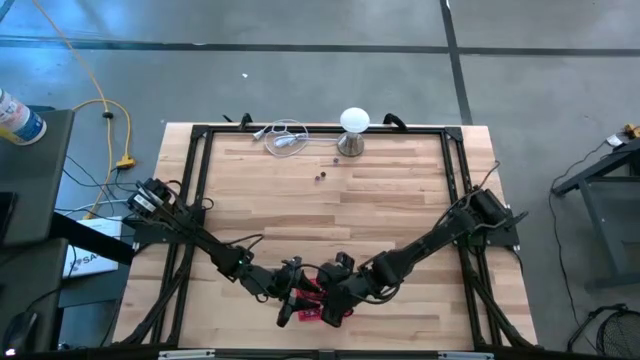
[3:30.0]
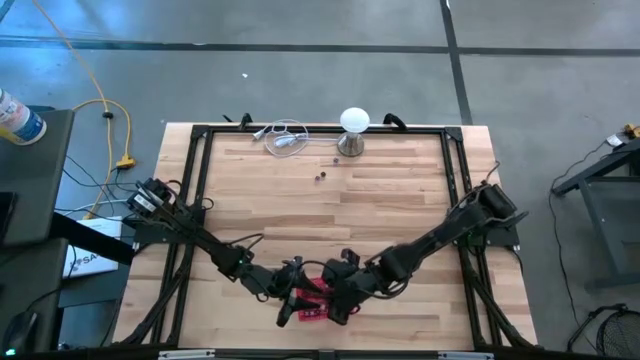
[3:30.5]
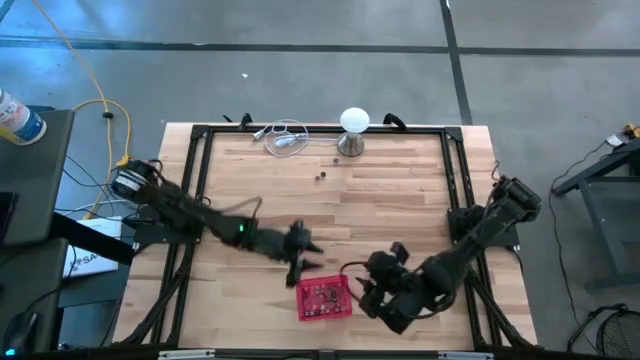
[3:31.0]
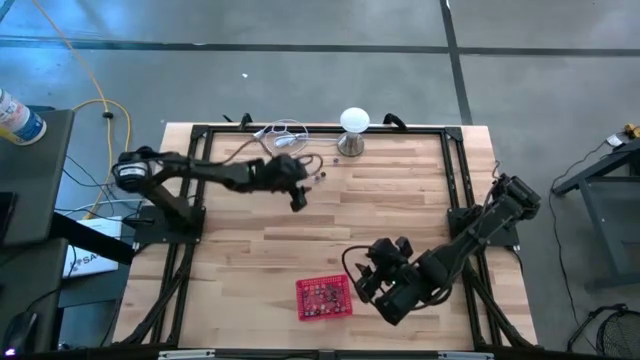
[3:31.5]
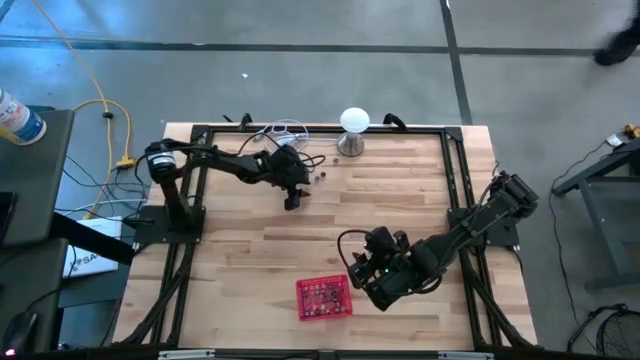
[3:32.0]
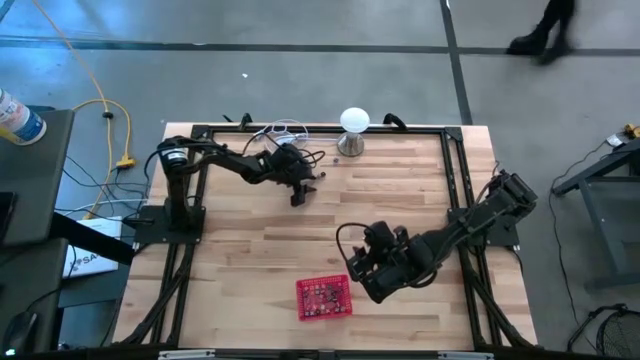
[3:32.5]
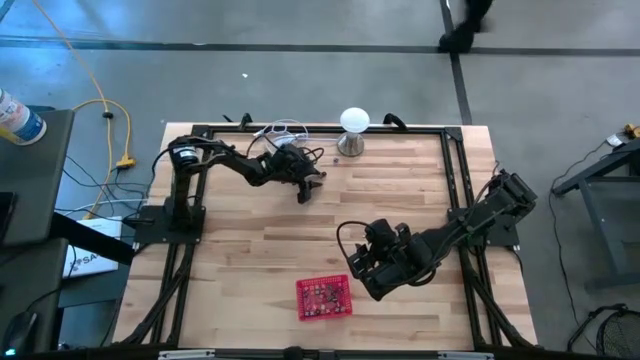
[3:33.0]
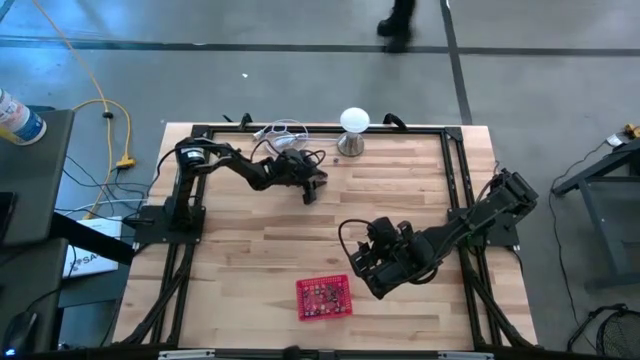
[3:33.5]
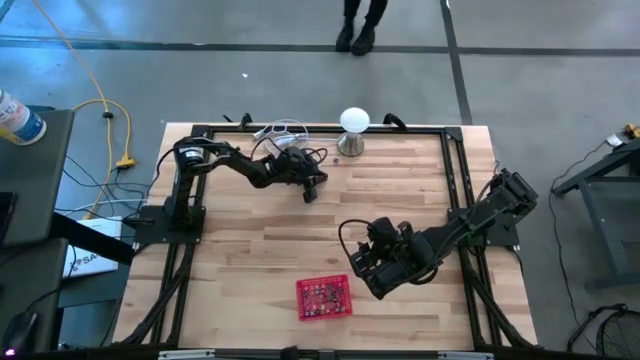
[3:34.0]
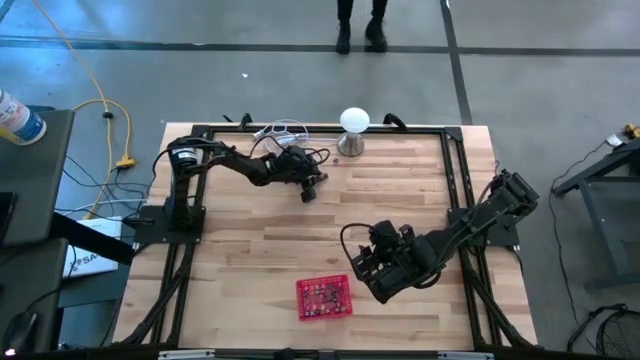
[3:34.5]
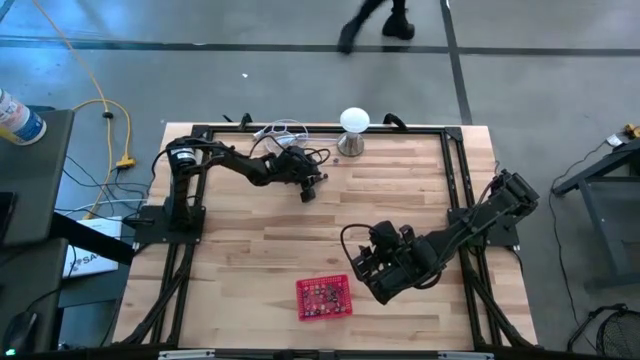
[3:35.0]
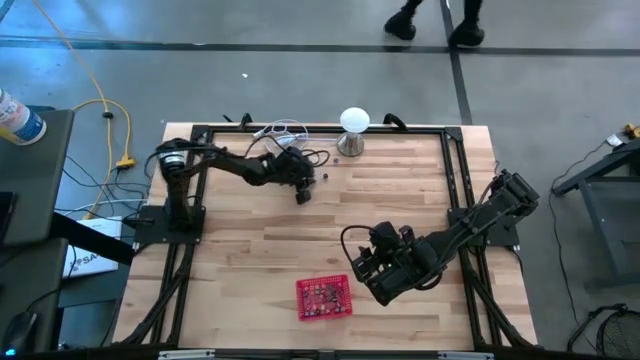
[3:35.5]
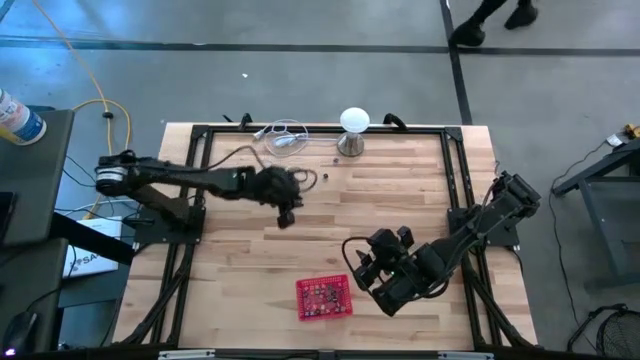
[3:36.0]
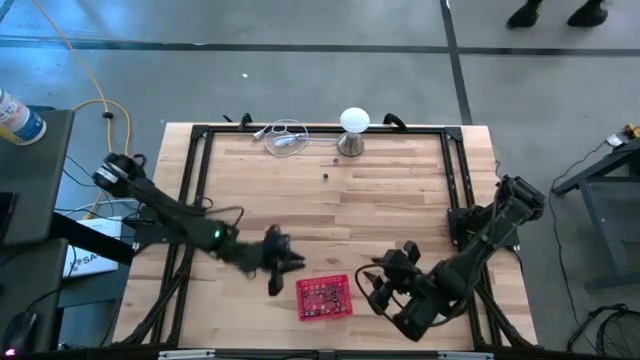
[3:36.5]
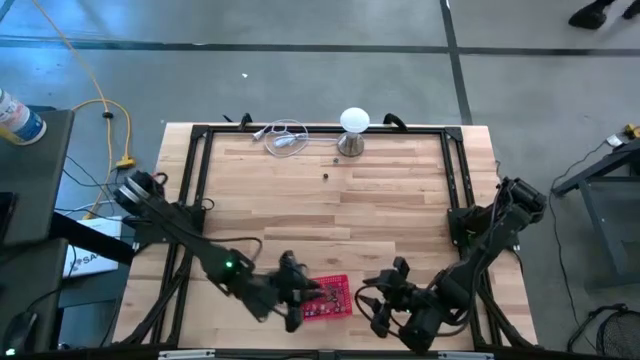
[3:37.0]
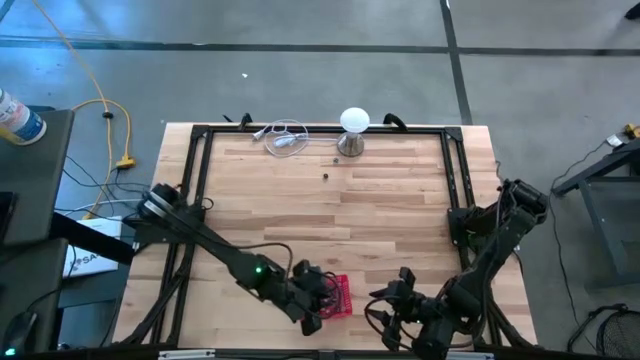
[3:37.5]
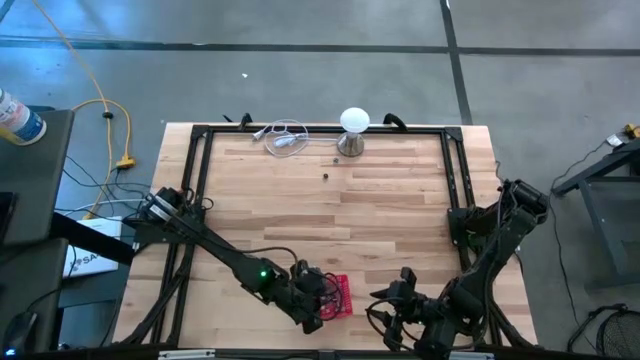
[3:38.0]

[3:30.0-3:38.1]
Task: Pick & Place Dice
Put the purple dice into the red bin

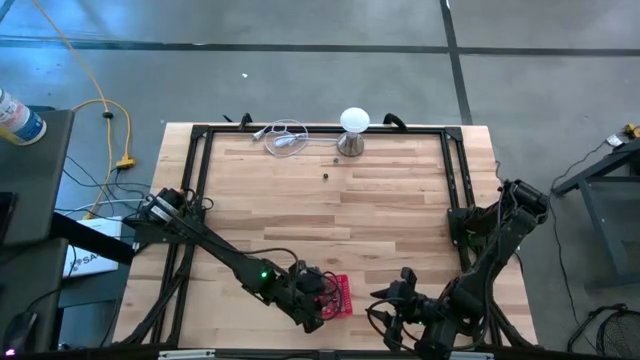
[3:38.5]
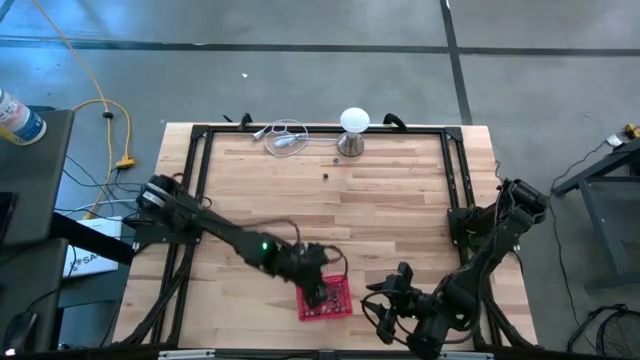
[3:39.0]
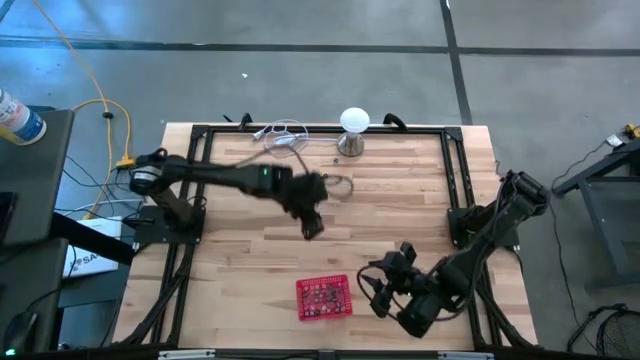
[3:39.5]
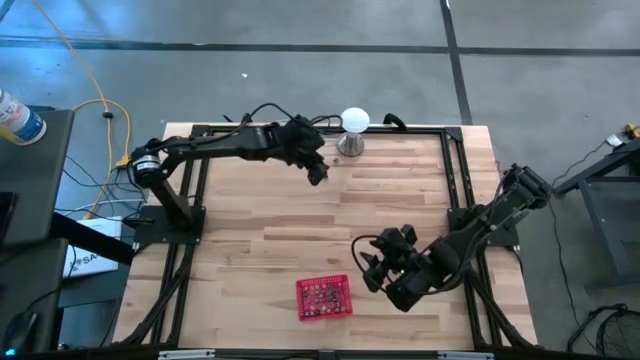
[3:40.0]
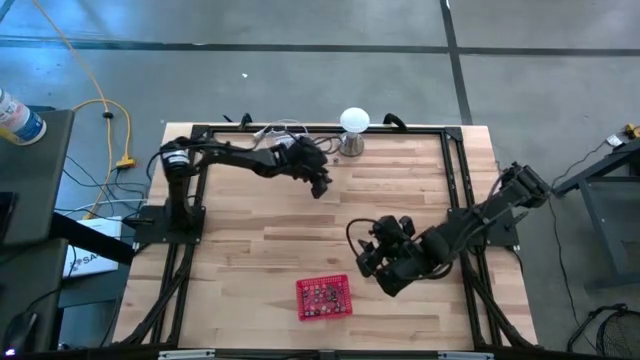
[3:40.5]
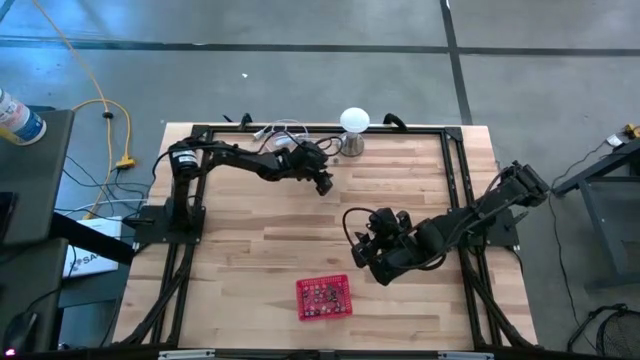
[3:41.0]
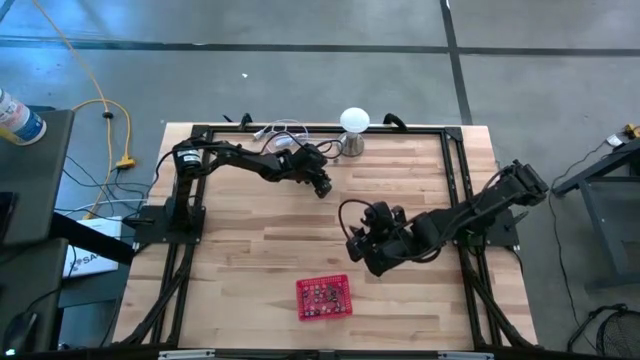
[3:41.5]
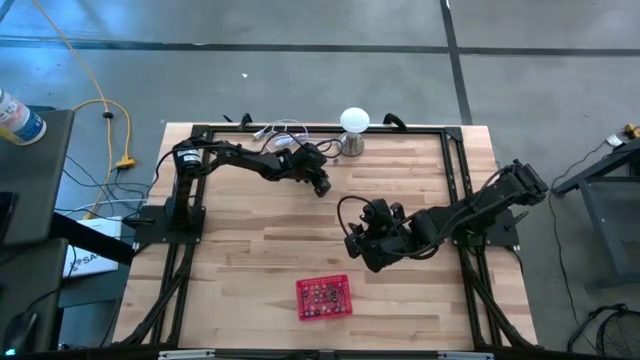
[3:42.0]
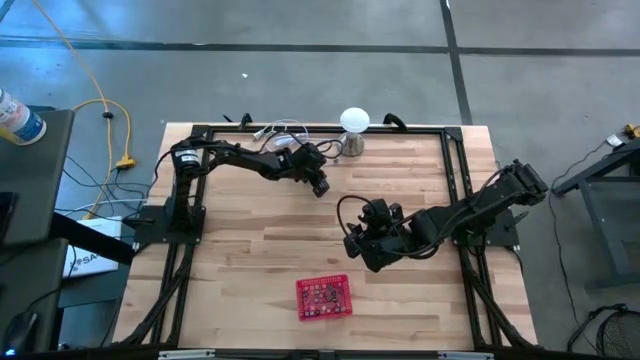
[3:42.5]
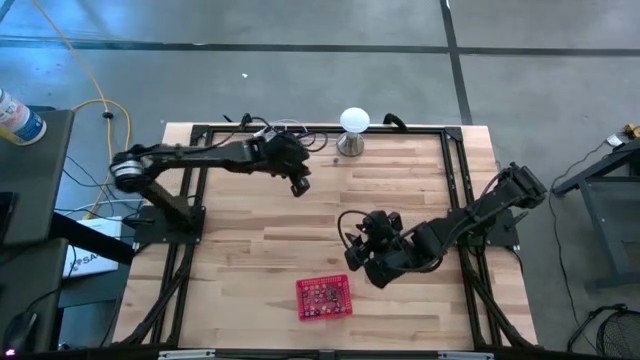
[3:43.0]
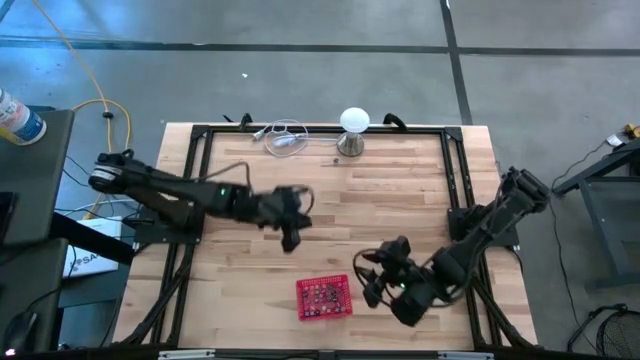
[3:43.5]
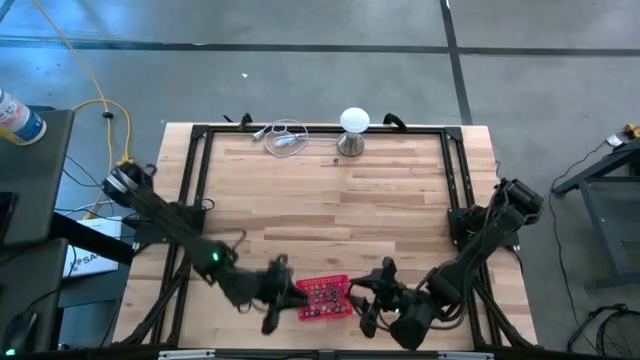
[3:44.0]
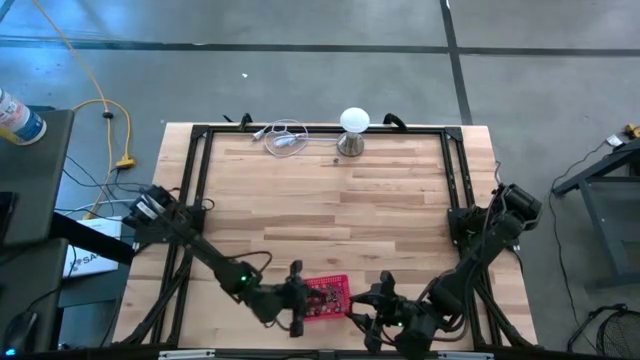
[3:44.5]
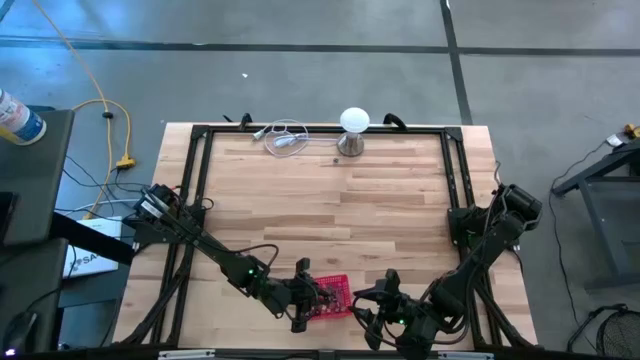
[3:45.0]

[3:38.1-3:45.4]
Put the black dice into the red bin

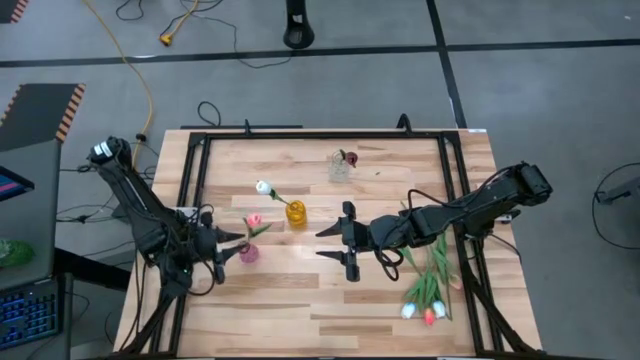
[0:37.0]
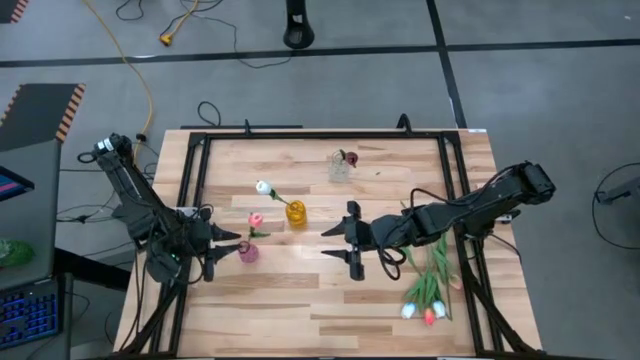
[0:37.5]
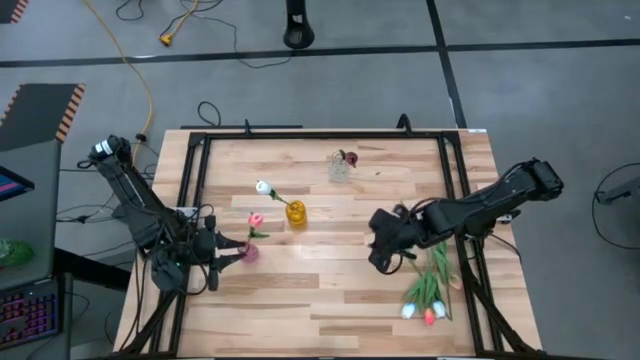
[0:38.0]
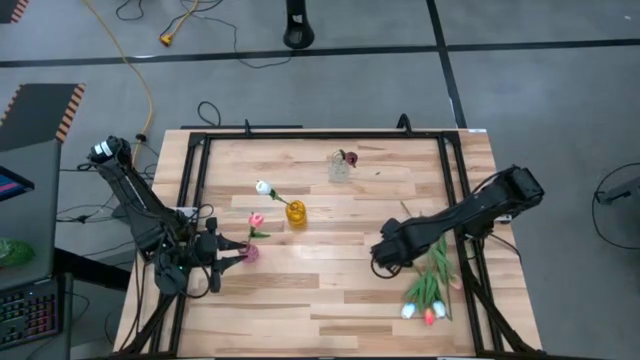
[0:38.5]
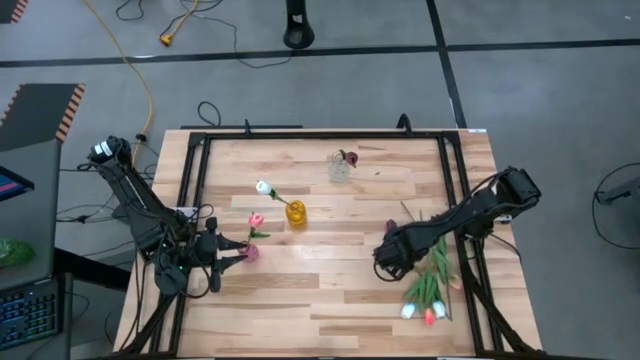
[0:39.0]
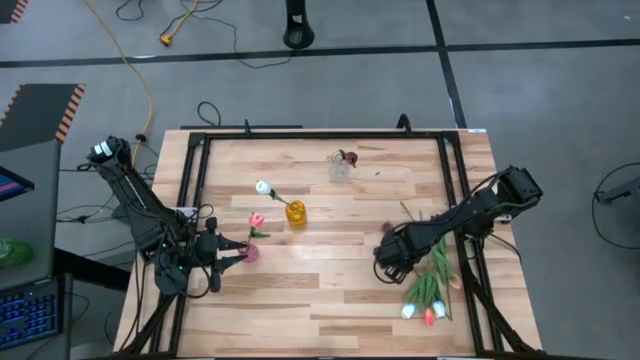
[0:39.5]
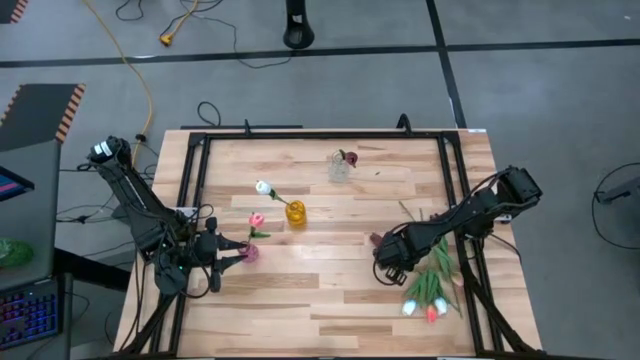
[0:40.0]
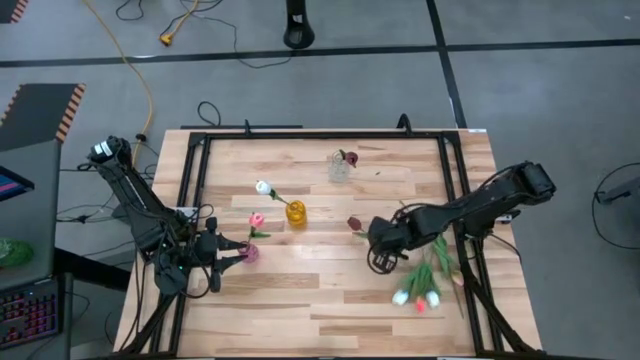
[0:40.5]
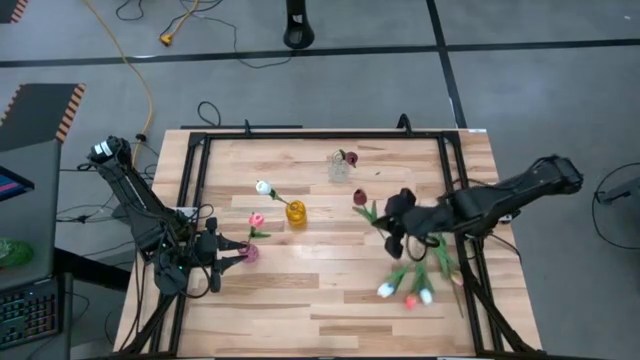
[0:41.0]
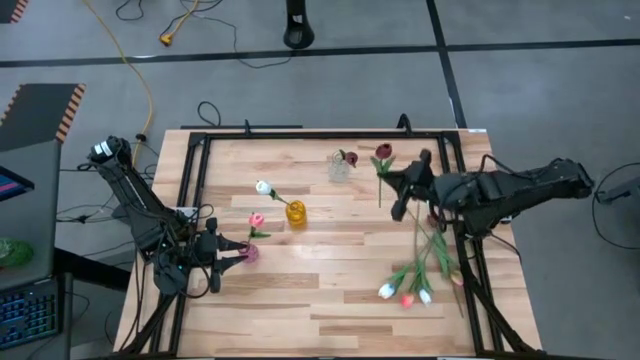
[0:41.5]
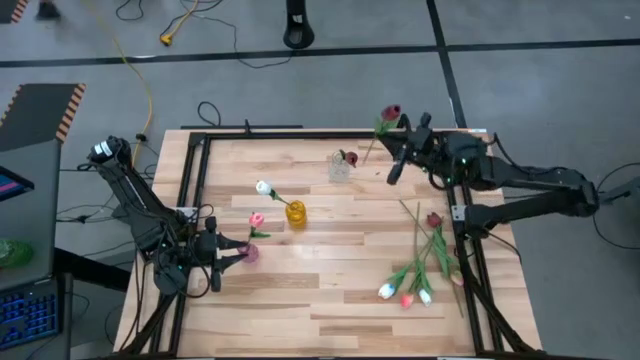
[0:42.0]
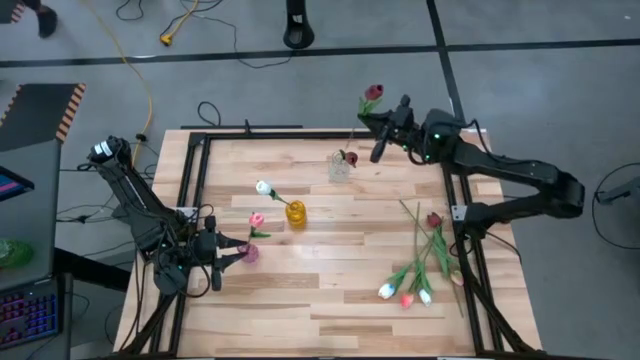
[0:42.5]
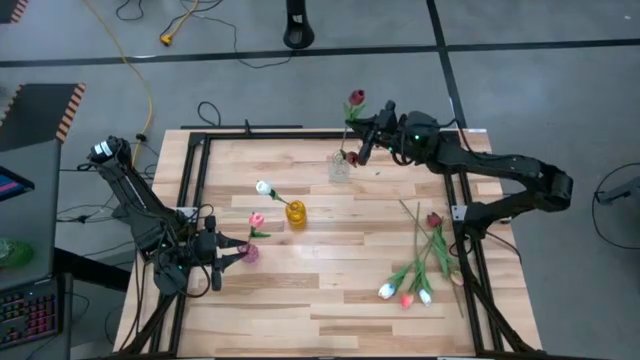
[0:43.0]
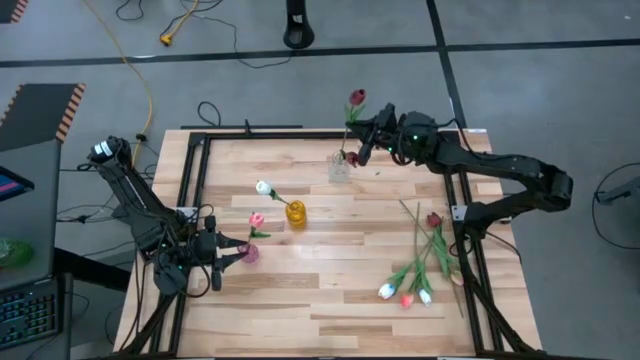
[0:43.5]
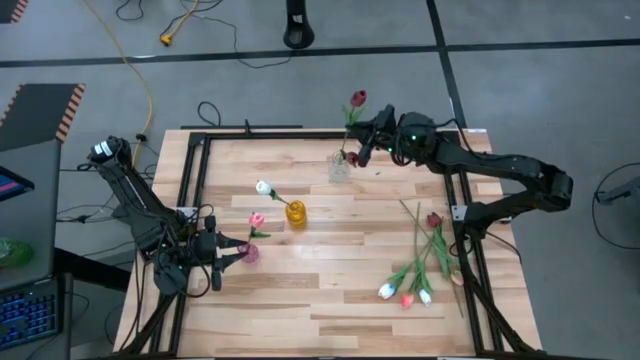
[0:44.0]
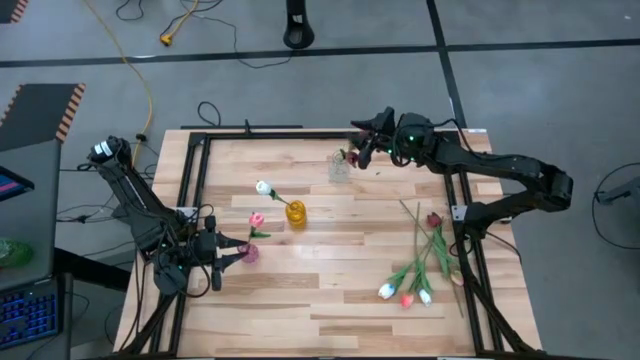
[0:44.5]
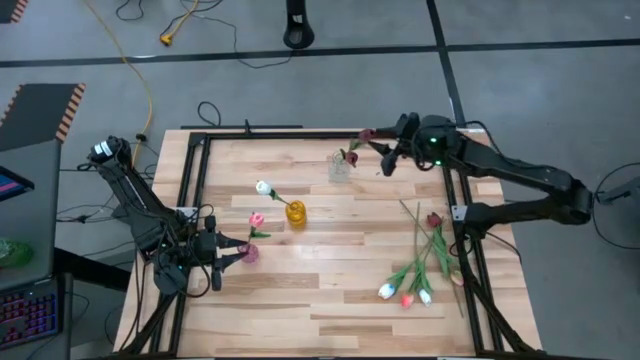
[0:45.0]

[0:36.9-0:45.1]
Task: Sort flowers into vase by color
Put the red flower into the transparent vase
